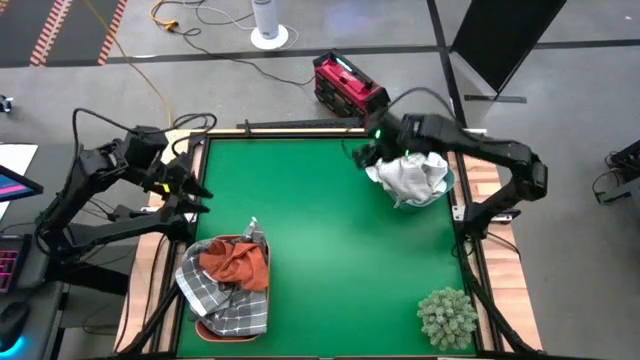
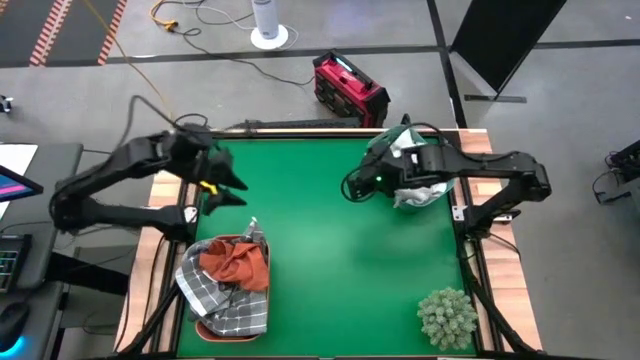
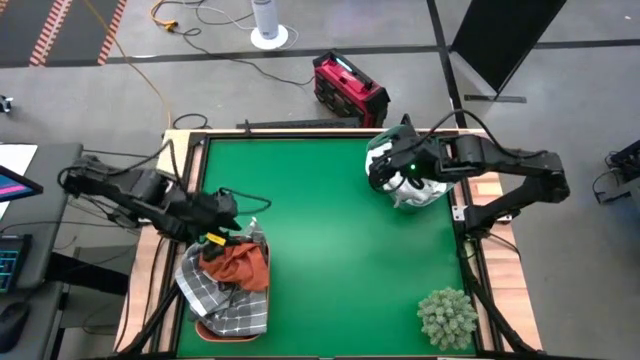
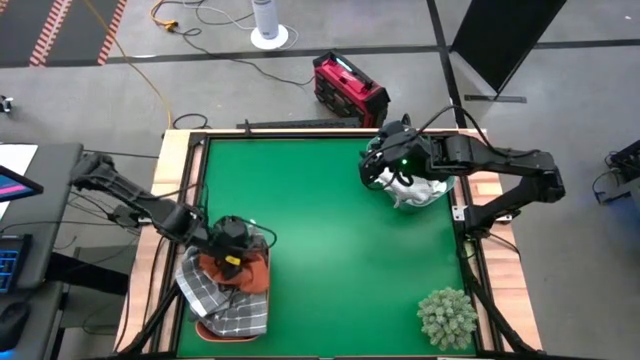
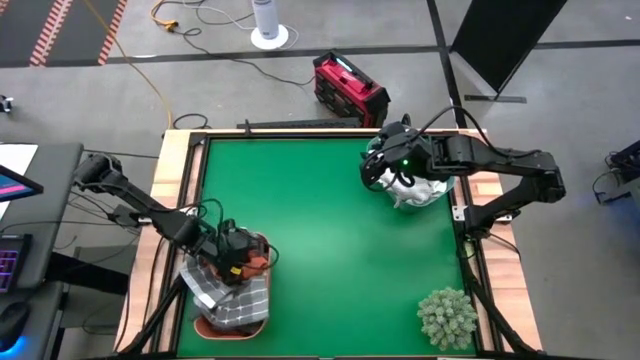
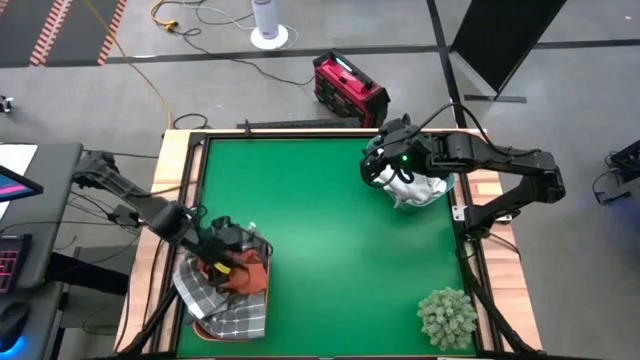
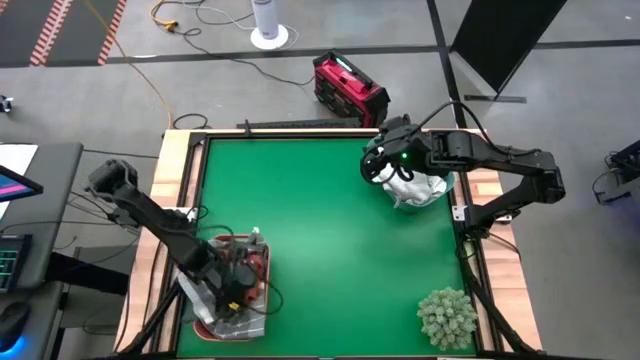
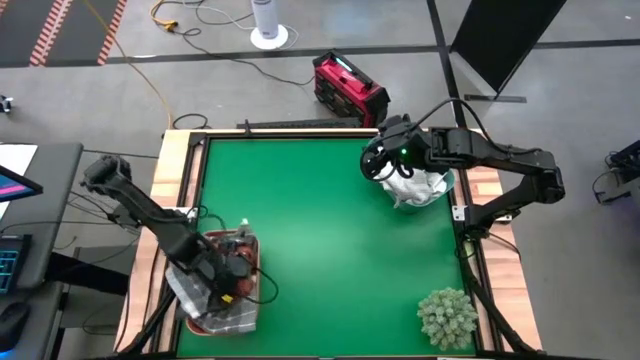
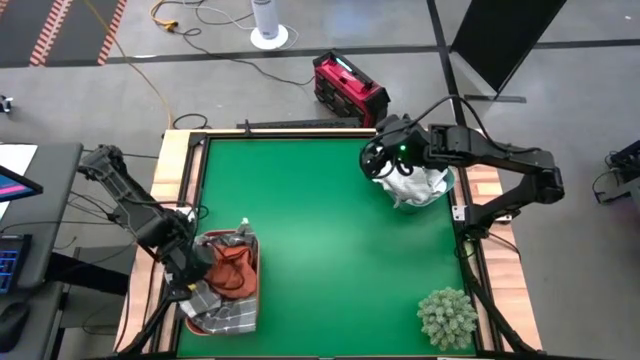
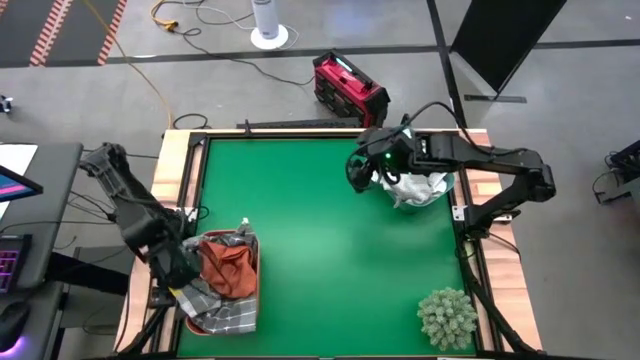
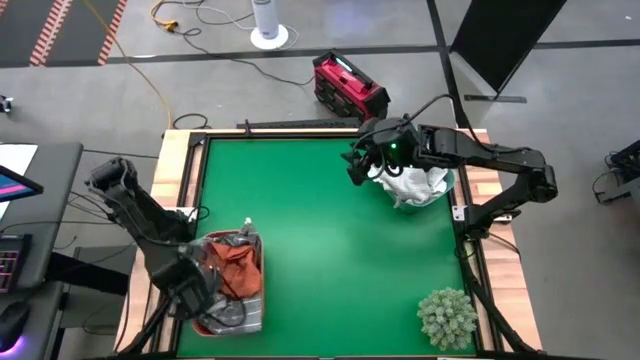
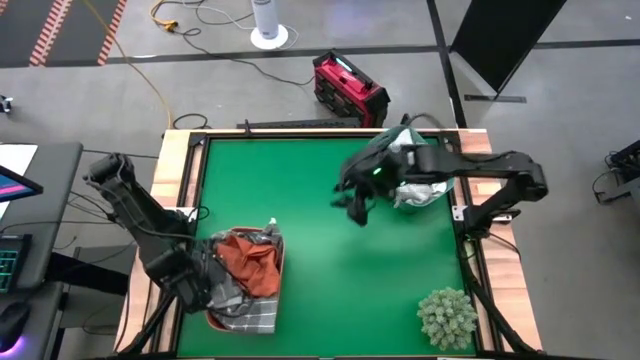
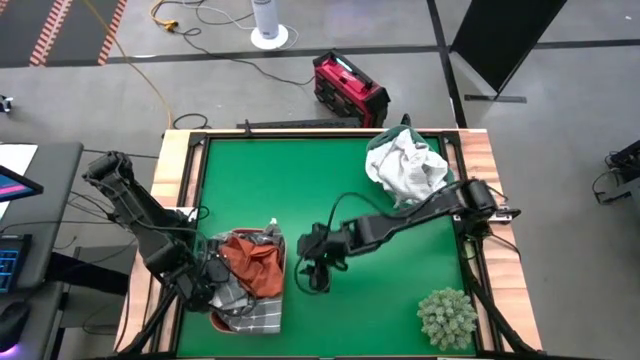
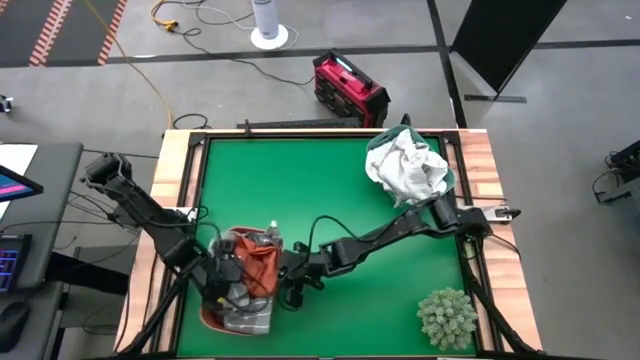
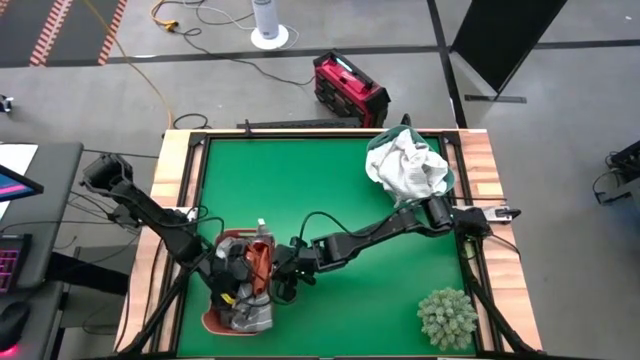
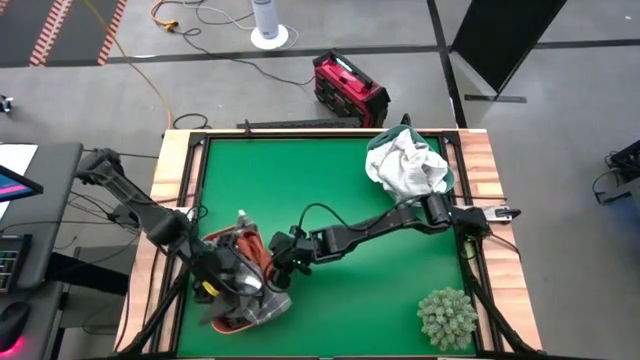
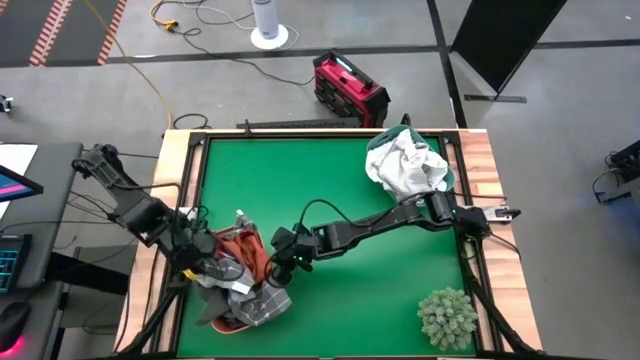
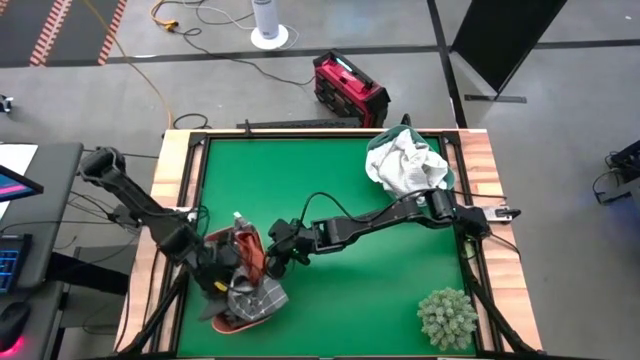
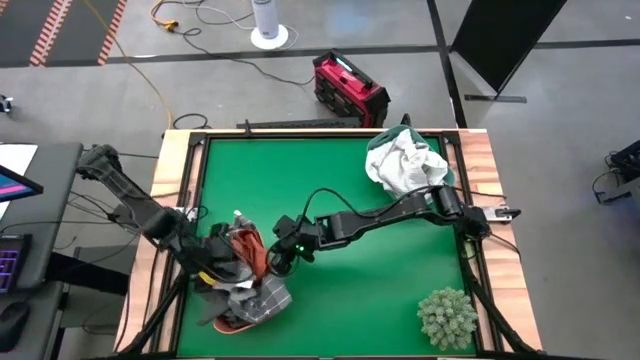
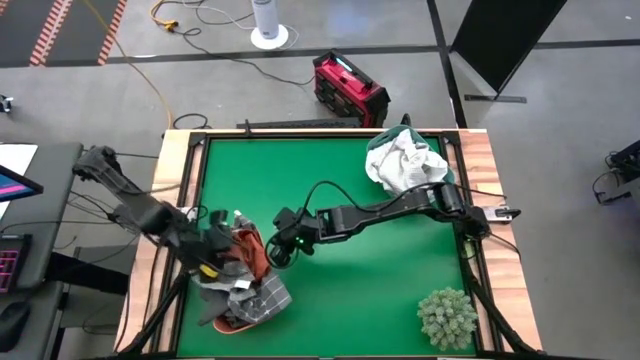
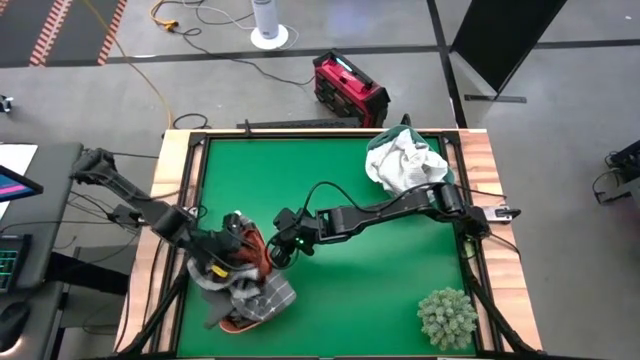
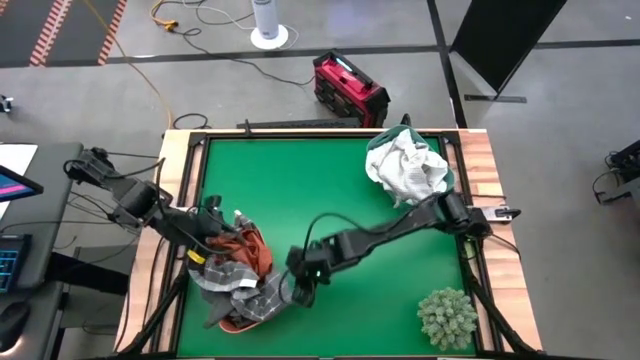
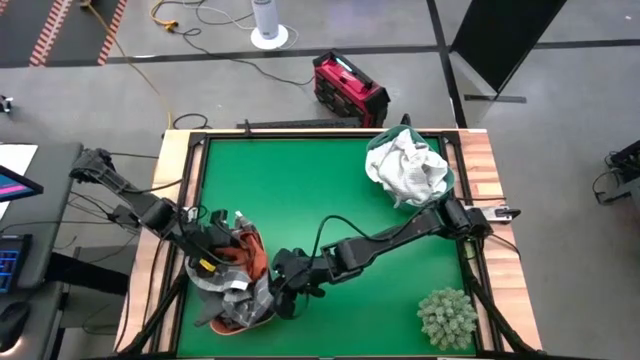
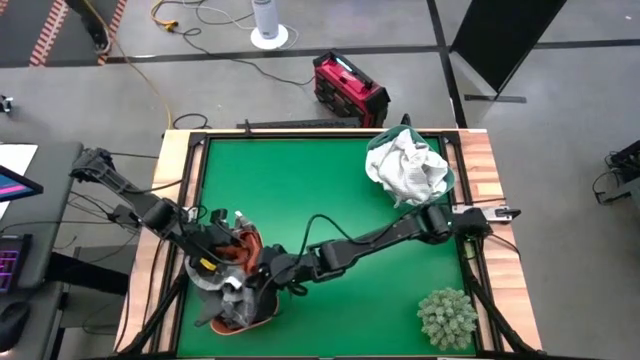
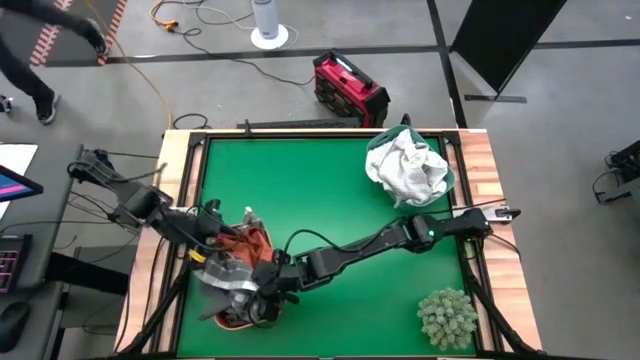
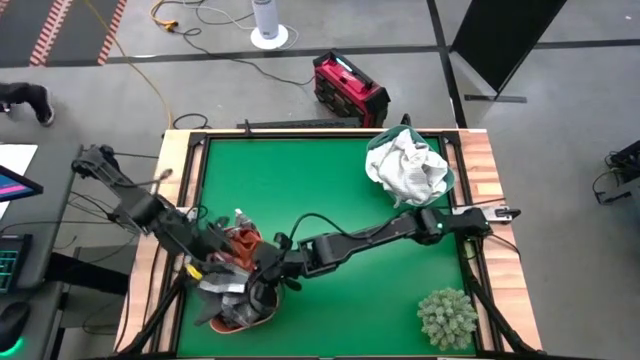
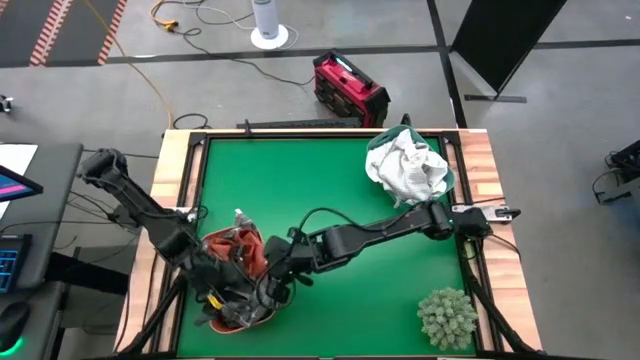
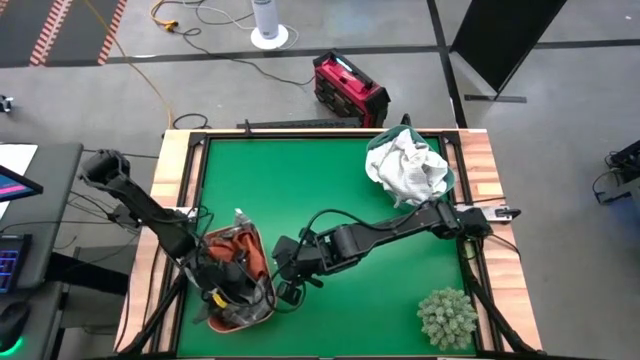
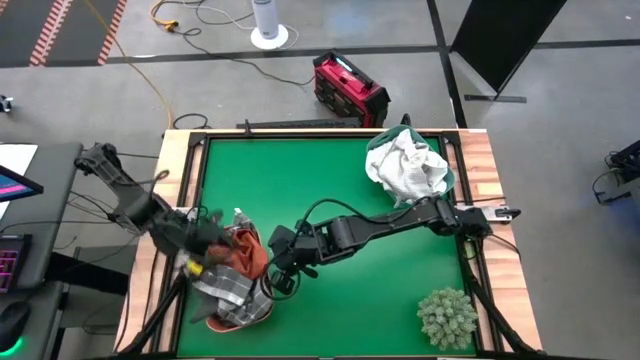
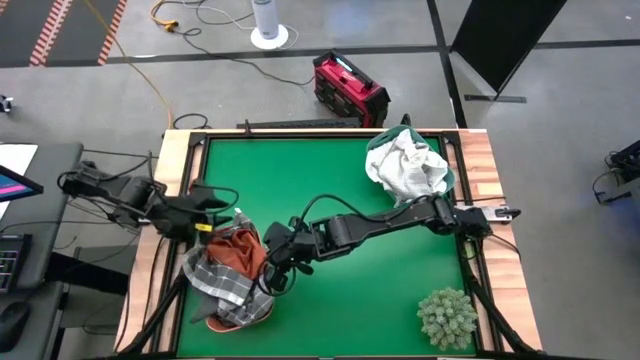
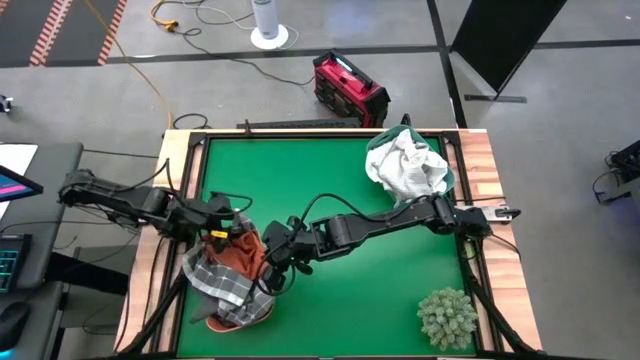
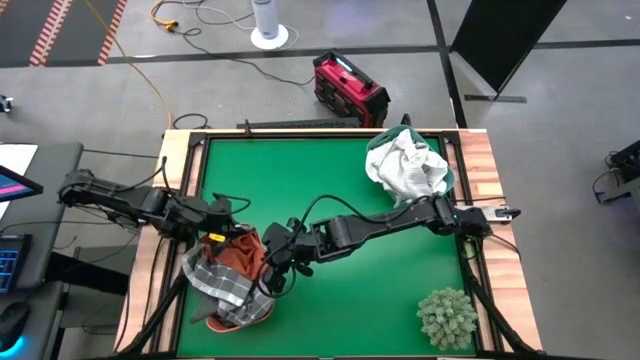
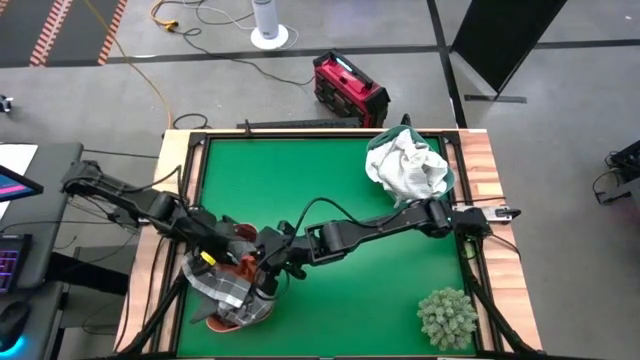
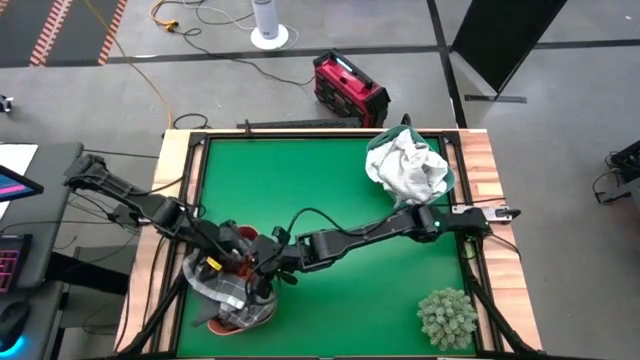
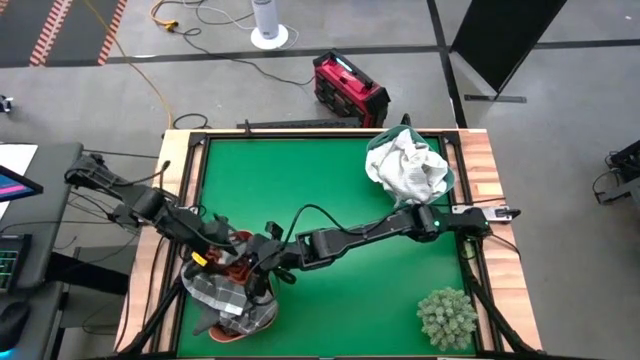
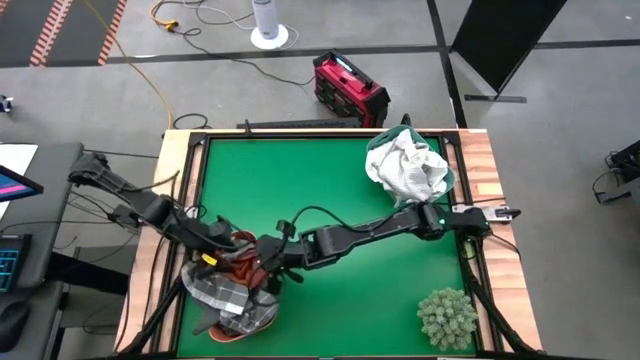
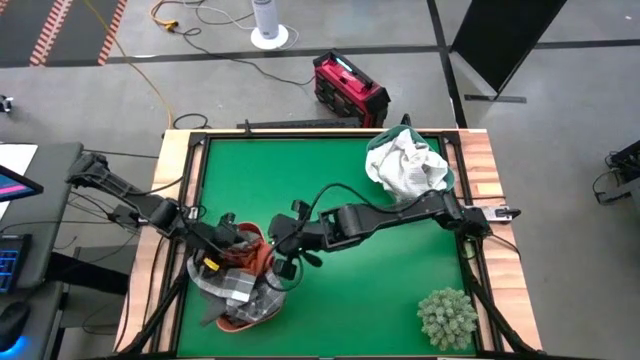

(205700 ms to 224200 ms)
Task: Sort towels by color in basket
Adjust the towels in the orange bin
